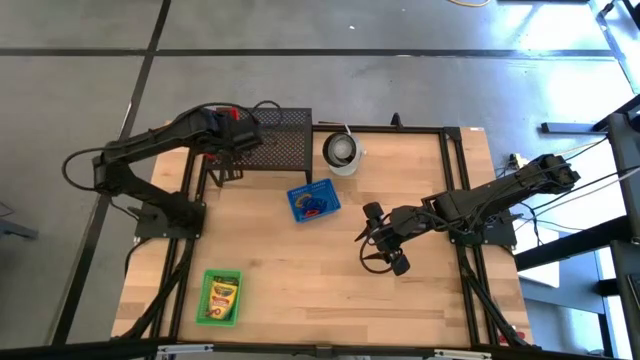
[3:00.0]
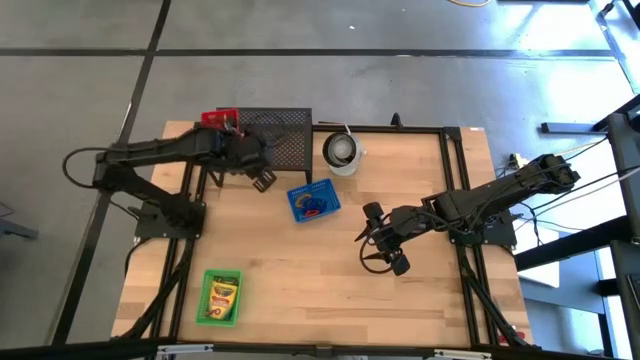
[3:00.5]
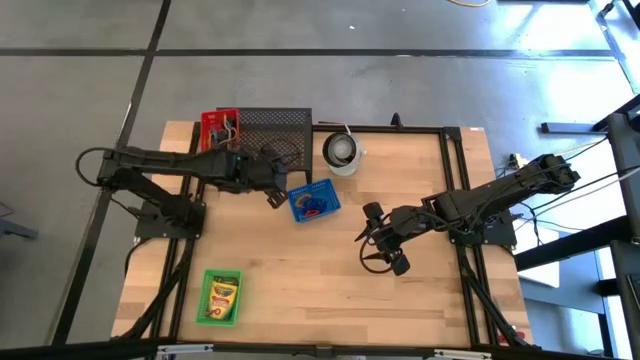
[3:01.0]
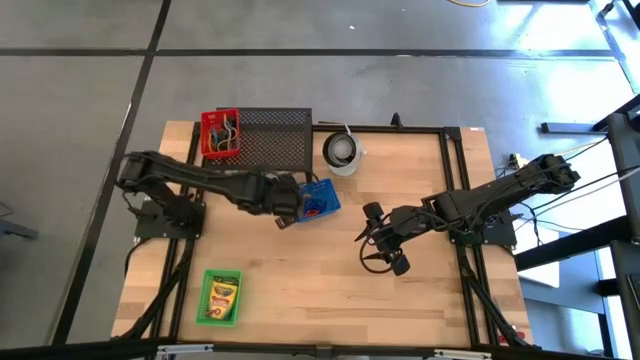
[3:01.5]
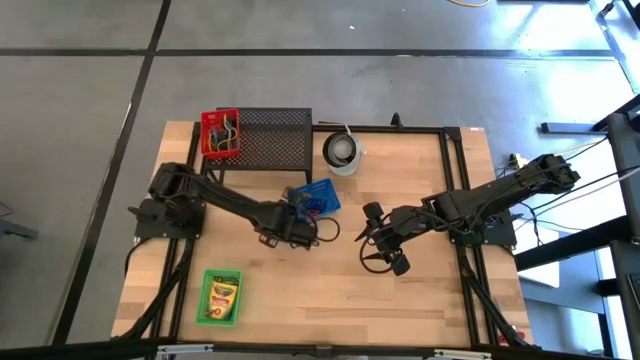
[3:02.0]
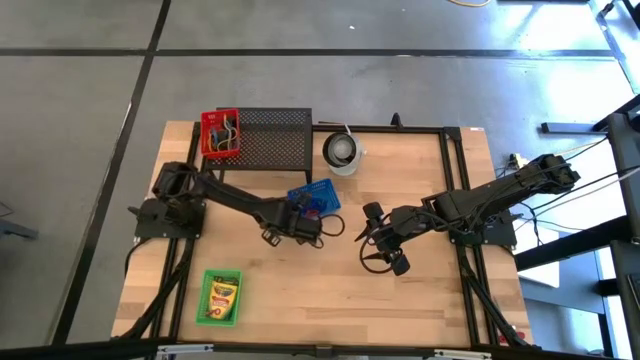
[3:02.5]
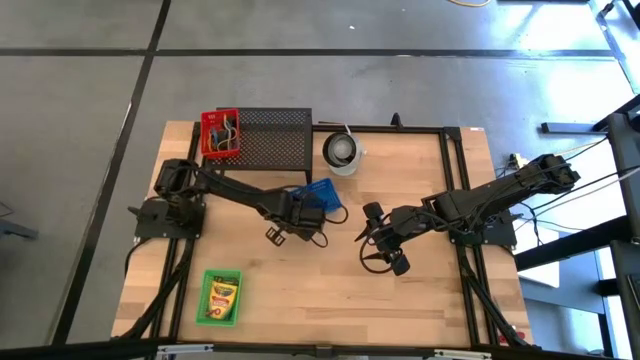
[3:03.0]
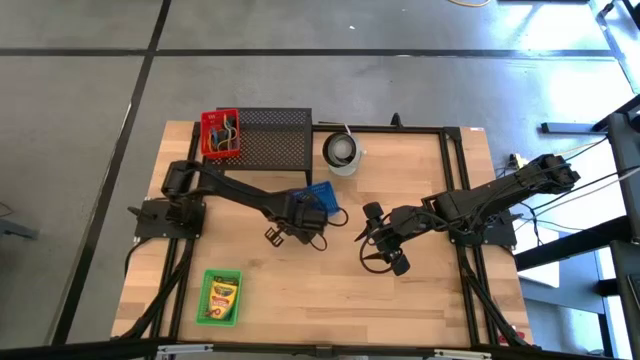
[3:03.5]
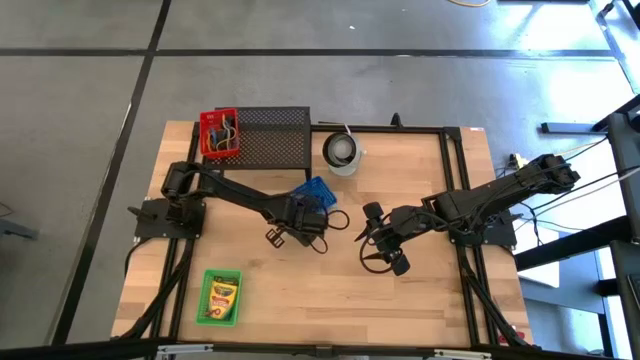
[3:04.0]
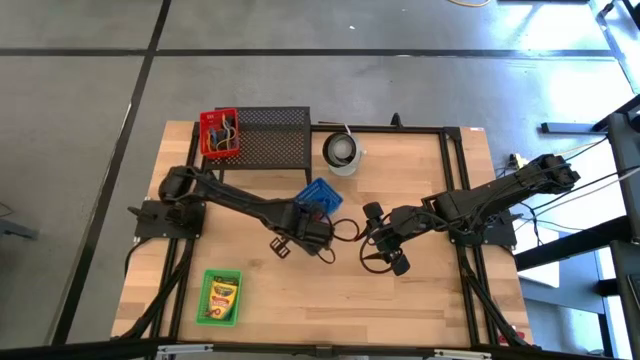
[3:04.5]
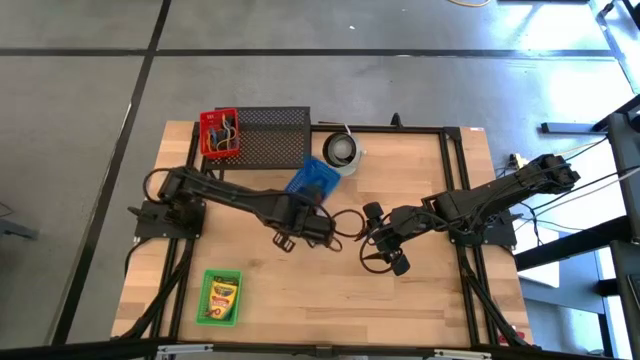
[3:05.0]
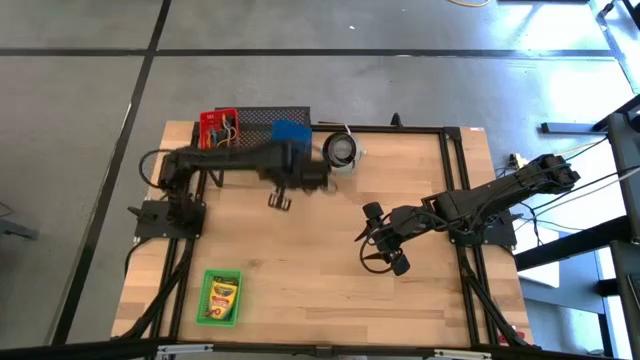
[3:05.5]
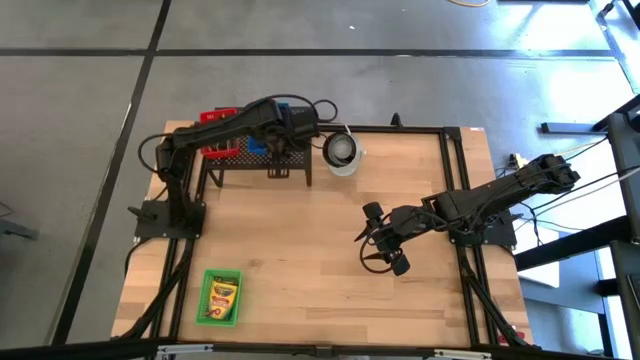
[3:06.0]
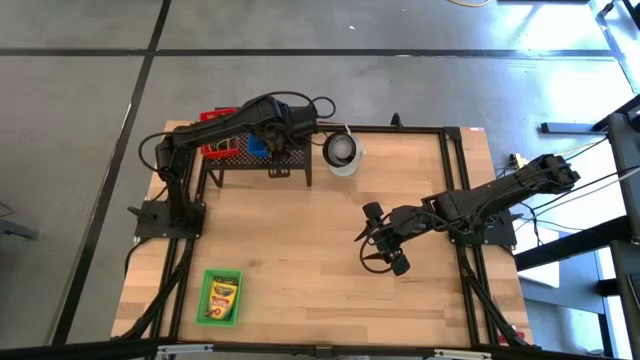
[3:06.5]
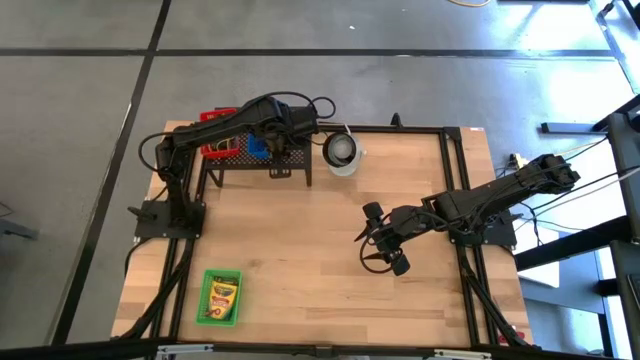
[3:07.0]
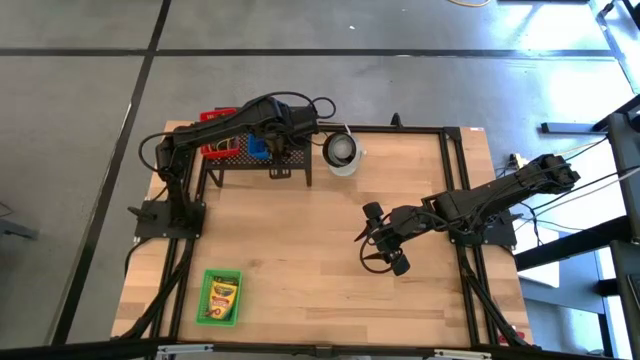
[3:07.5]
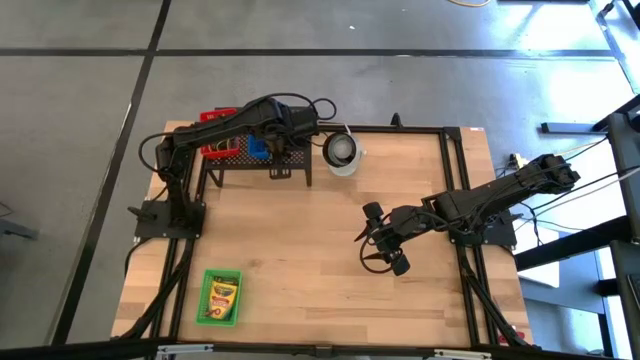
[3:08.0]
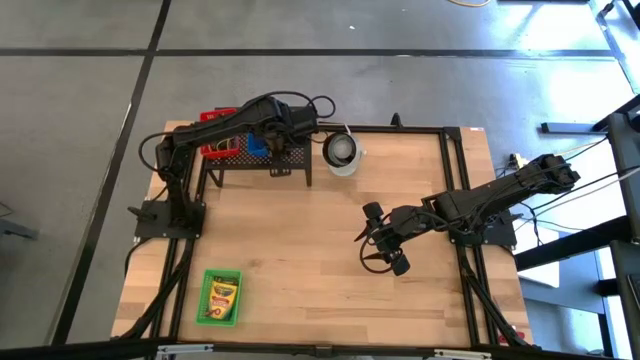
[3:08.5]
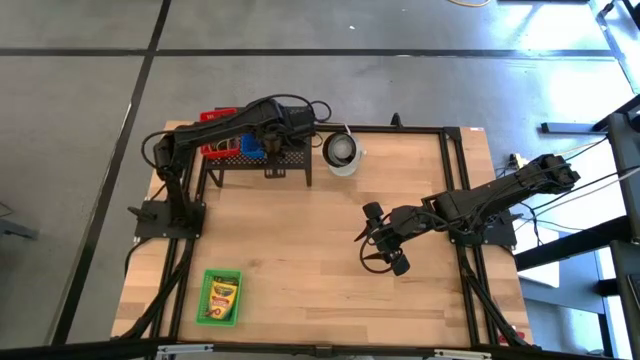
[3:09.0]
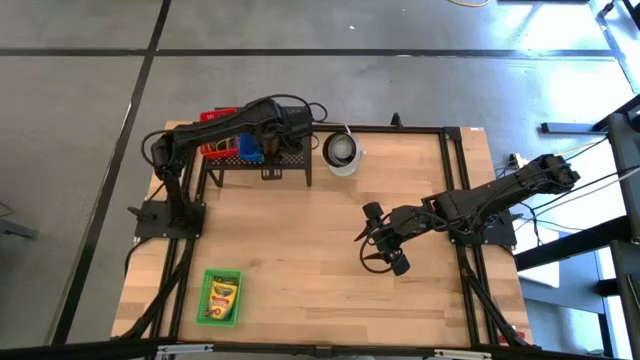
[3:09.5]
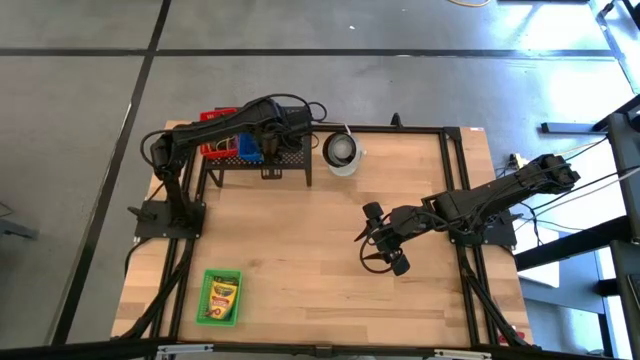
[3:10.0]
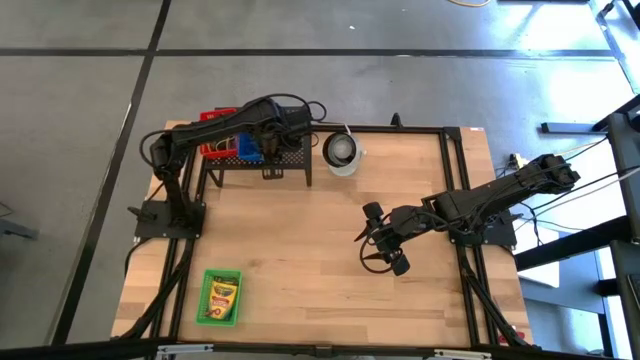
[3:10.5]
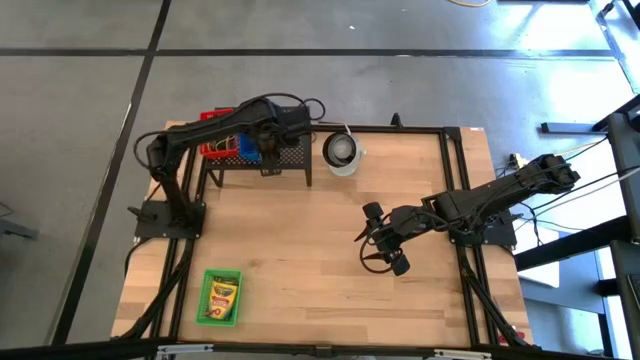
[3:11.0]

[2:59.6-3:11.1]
Task: Pick & Place Office Desk Supplies
Put the blue bin with spring keychains on the shelf

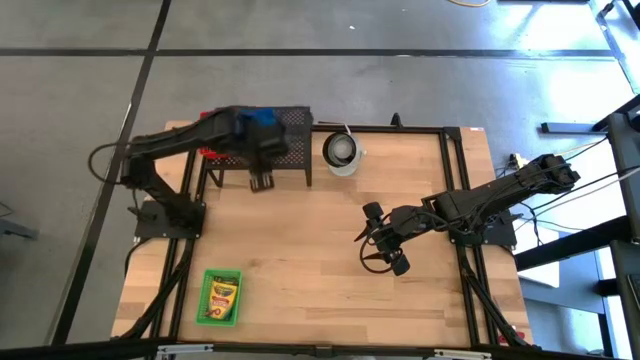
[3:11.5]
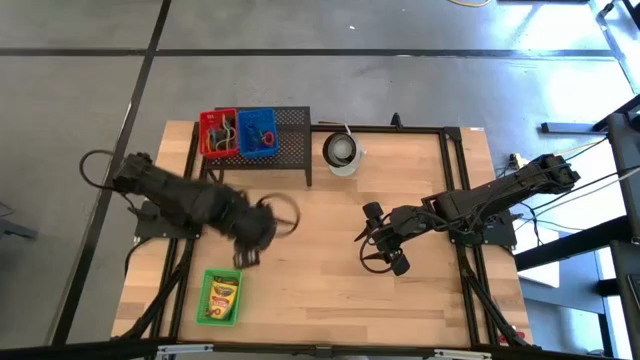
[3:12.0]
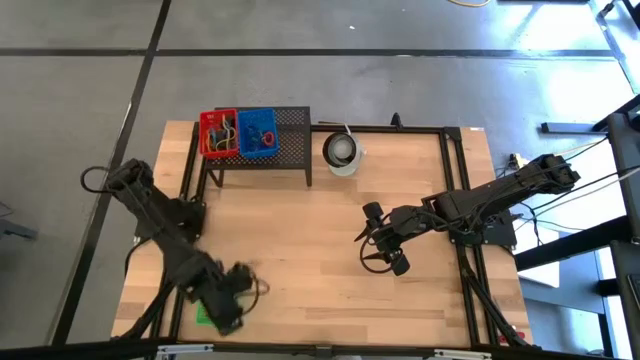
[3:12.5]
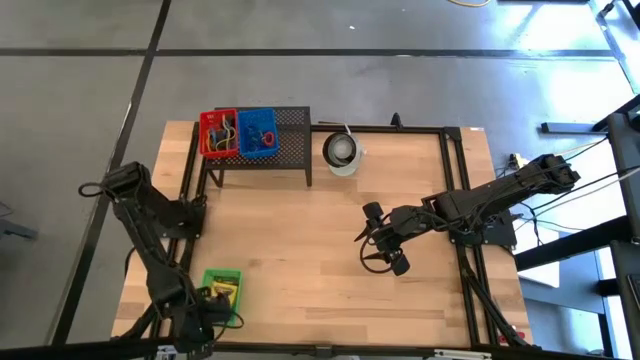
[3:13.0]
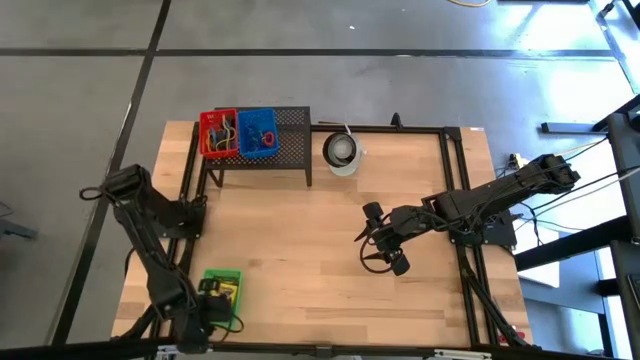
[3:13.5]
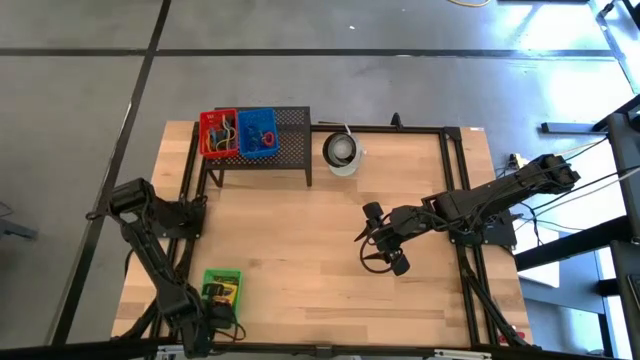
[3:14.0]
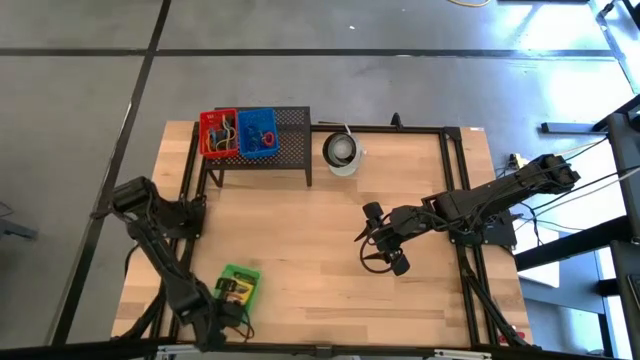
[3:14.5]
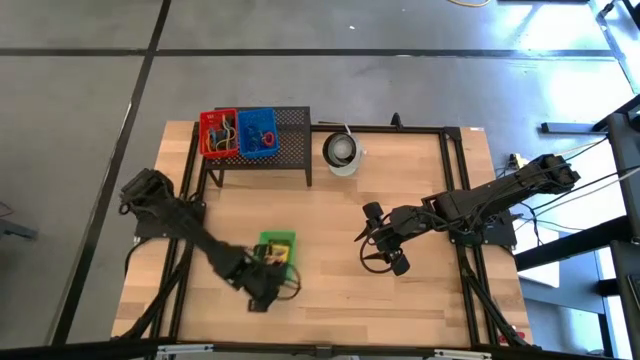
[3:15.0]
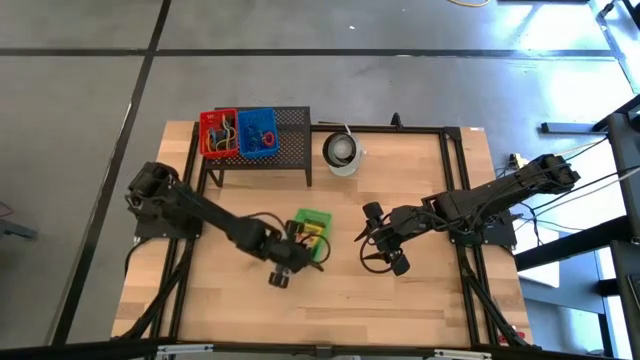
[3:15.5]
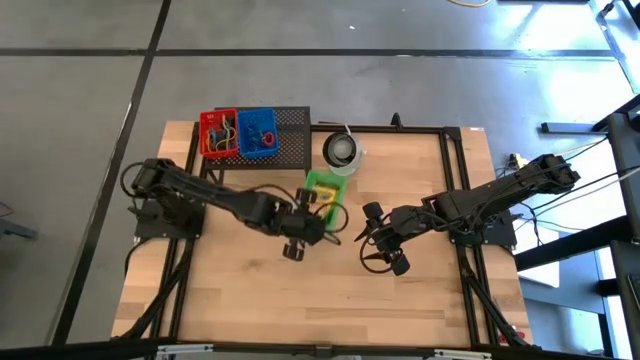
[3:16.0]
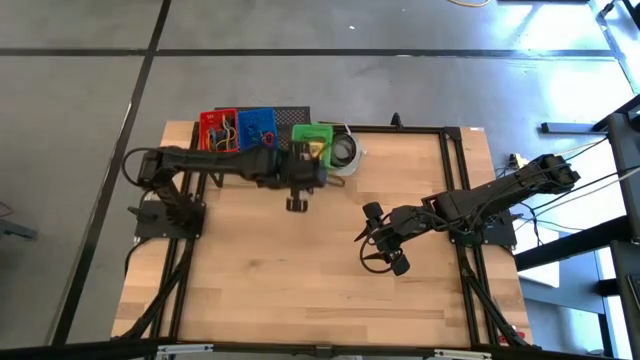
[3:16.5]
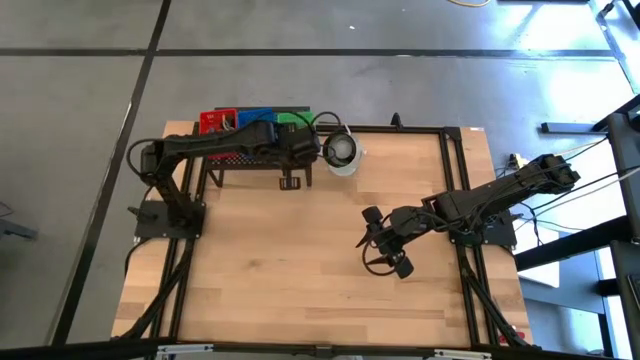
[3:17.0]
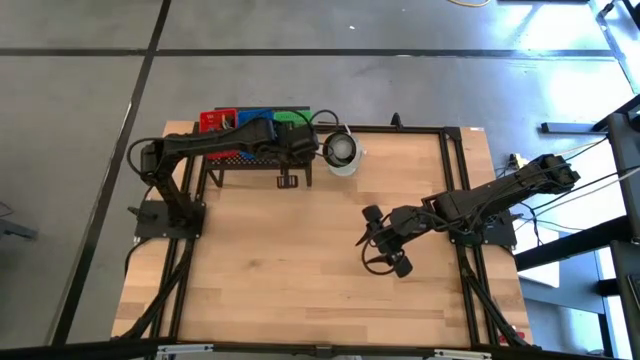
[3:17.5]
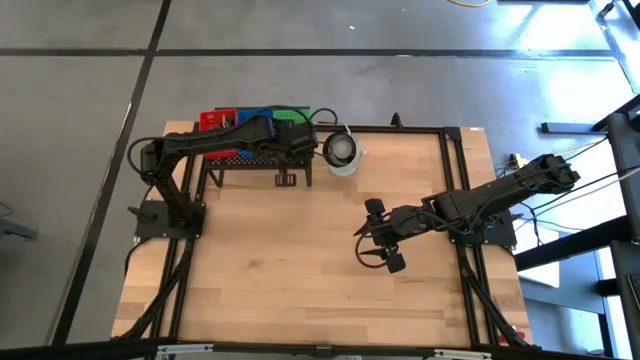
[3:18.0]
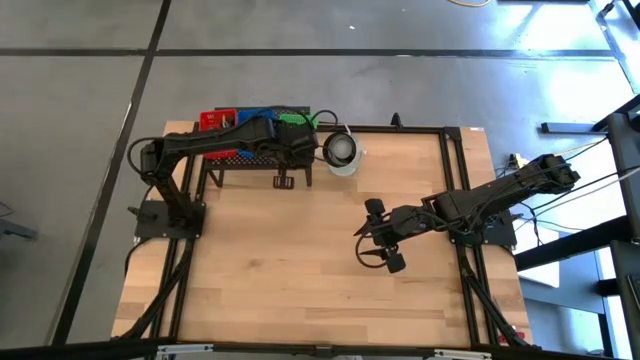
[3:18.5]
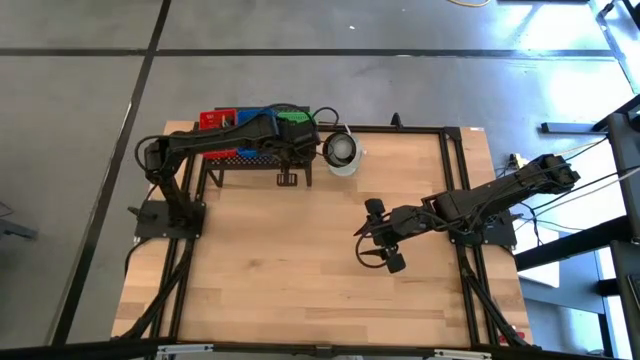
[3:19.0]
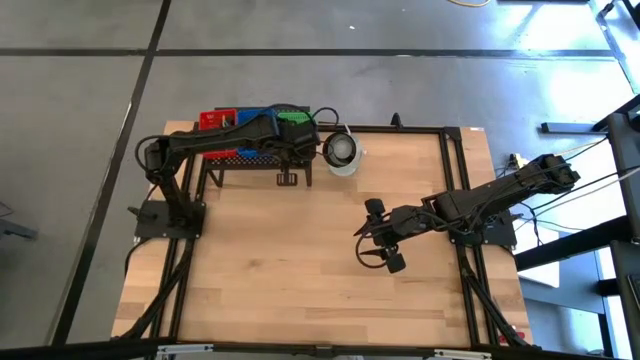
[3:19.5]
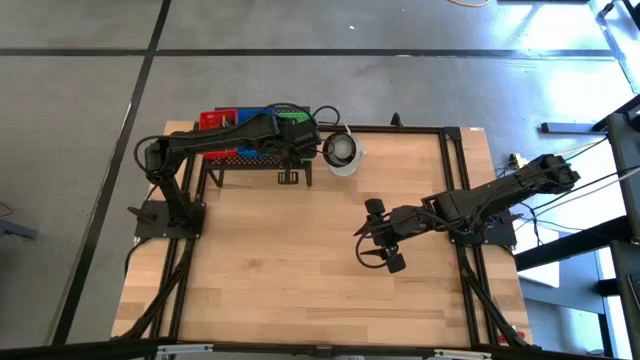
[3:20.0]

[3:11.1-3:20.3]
Put the green bin with crayon boxes on the shelf

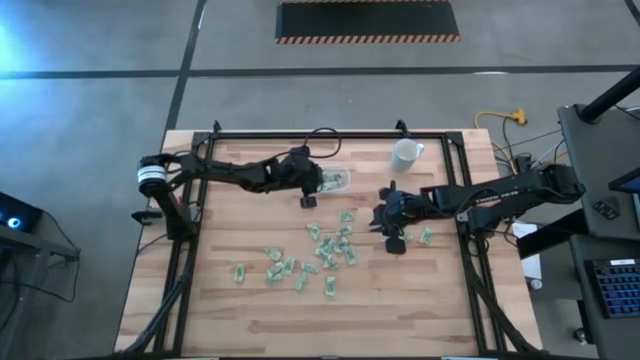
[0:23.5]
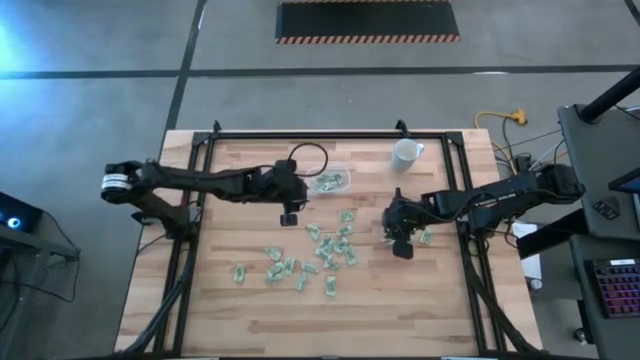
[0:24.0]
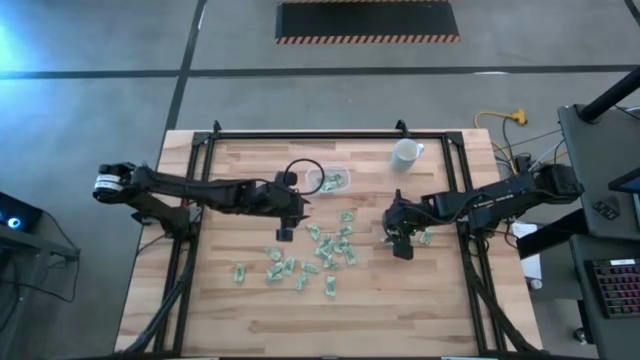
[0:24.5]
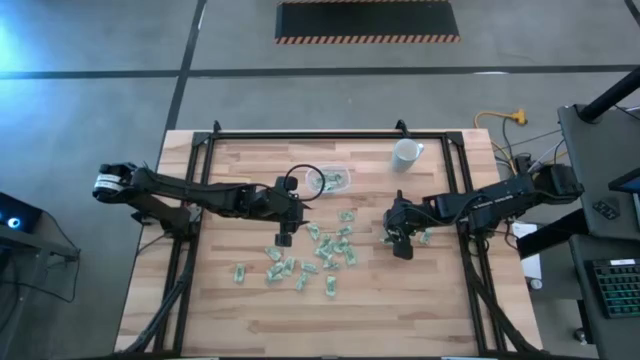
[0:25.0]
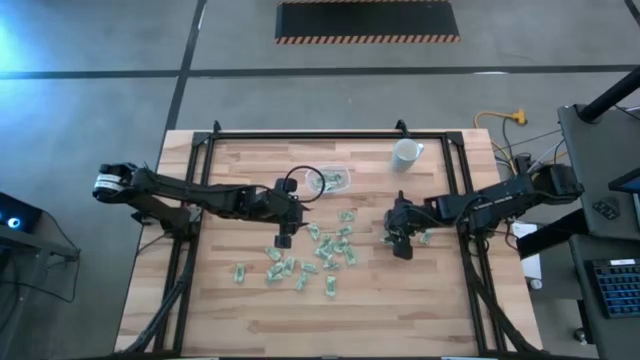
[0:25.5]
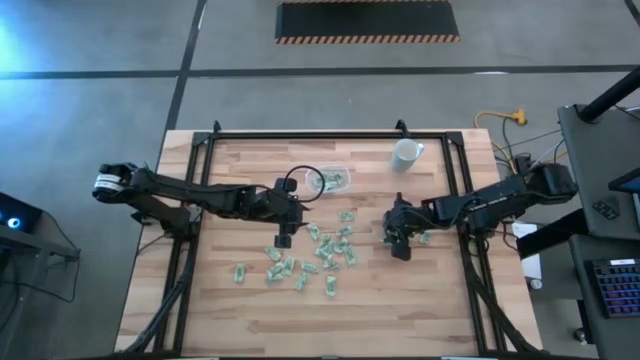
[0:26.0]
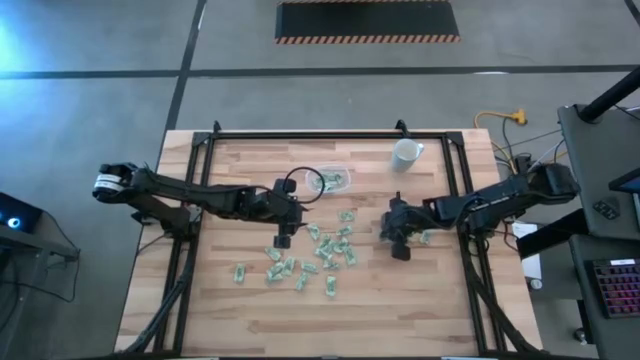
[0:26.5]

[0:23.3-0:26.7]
Task: Pick and place Stevia / Truvia into bins
Put the stevia packet into the transparent container
